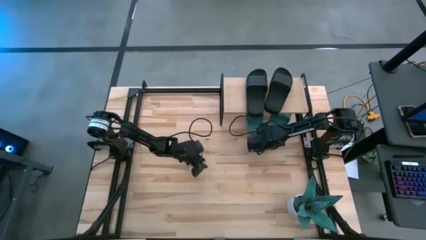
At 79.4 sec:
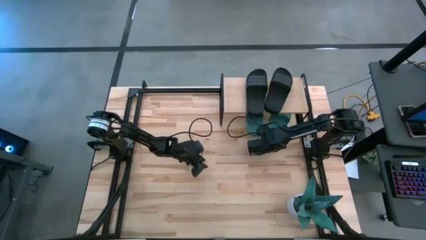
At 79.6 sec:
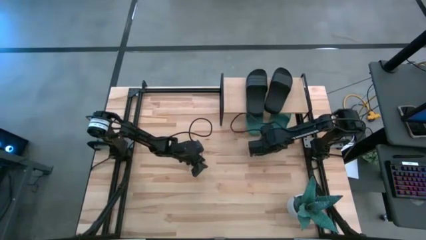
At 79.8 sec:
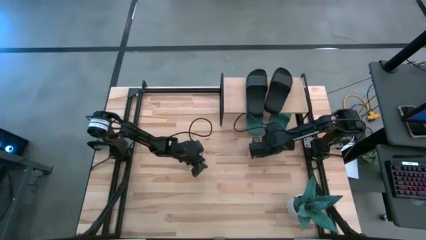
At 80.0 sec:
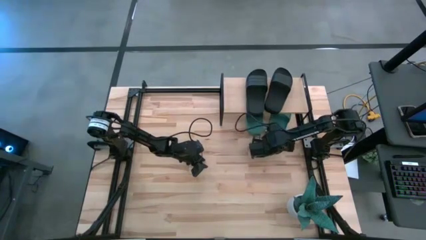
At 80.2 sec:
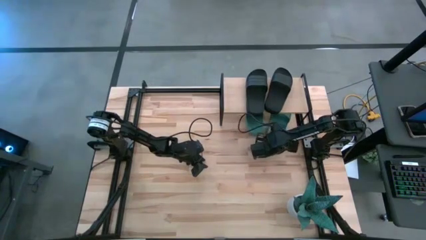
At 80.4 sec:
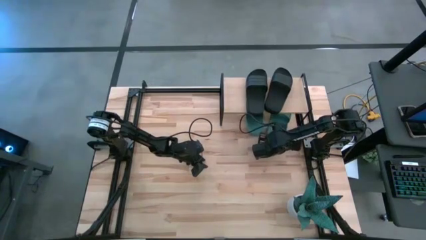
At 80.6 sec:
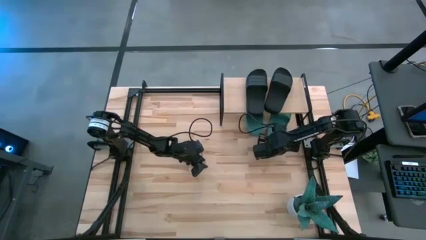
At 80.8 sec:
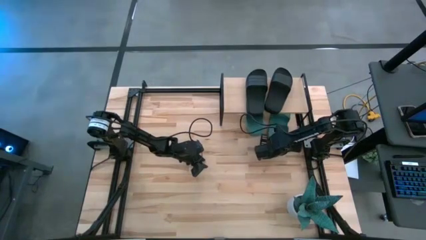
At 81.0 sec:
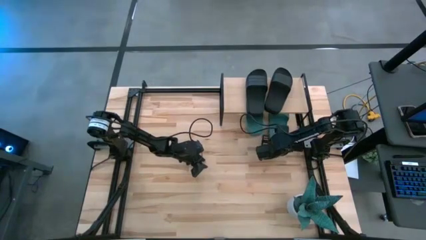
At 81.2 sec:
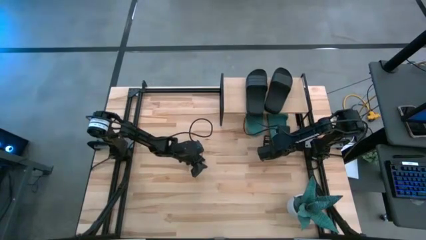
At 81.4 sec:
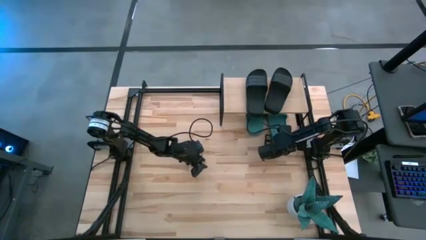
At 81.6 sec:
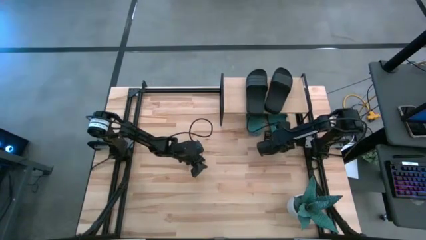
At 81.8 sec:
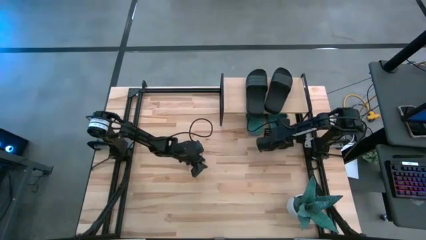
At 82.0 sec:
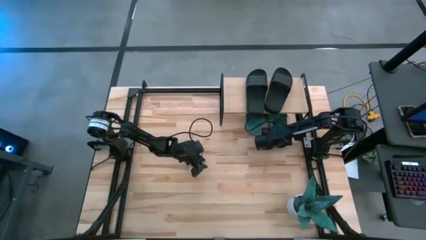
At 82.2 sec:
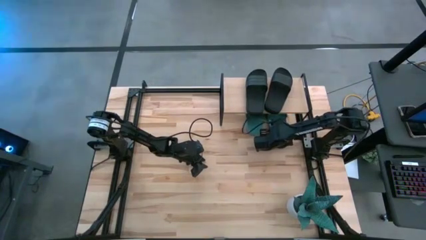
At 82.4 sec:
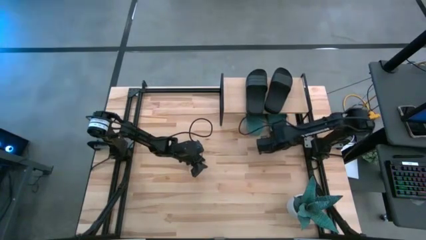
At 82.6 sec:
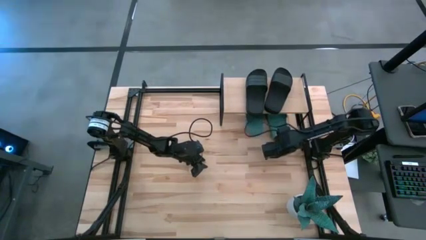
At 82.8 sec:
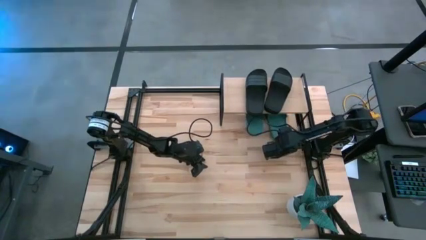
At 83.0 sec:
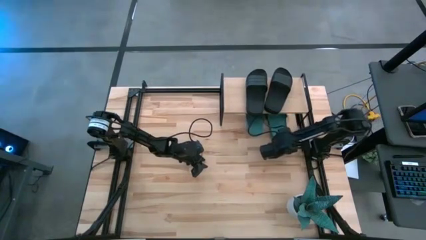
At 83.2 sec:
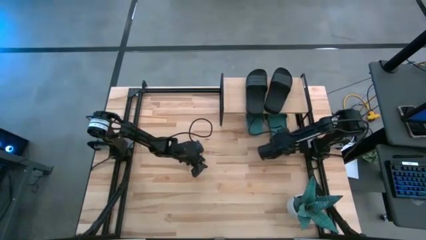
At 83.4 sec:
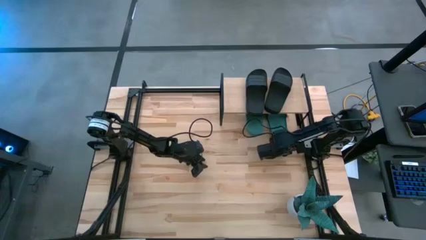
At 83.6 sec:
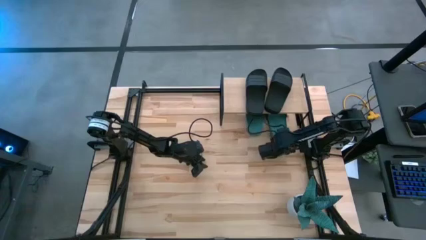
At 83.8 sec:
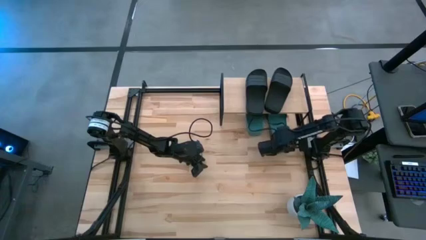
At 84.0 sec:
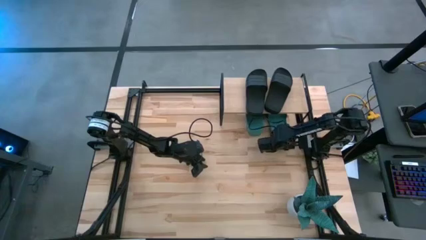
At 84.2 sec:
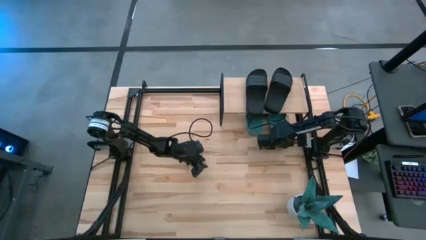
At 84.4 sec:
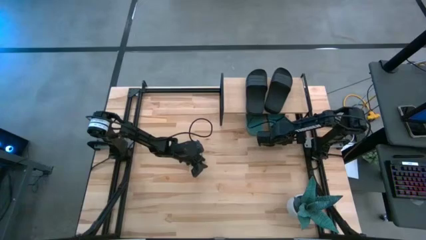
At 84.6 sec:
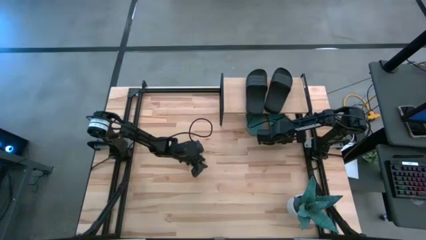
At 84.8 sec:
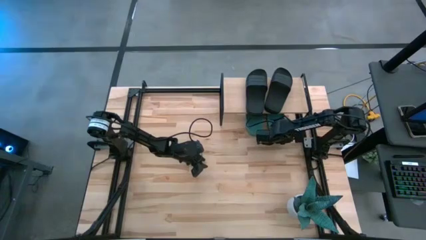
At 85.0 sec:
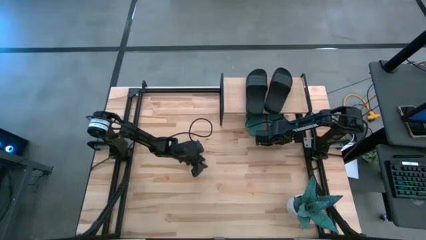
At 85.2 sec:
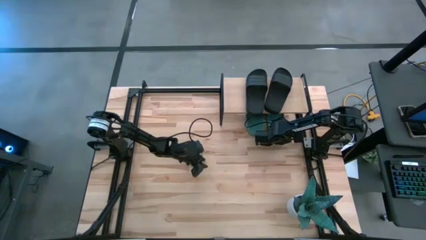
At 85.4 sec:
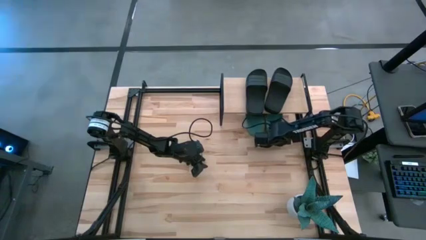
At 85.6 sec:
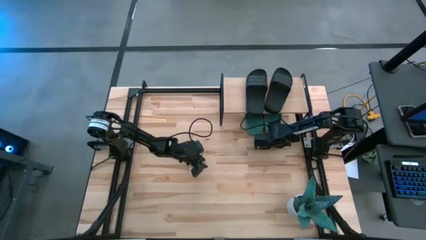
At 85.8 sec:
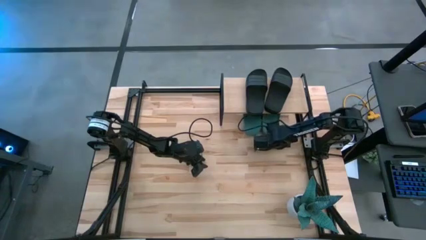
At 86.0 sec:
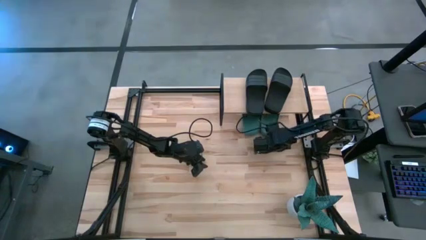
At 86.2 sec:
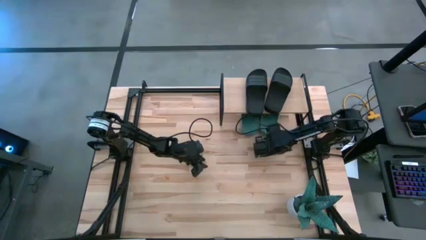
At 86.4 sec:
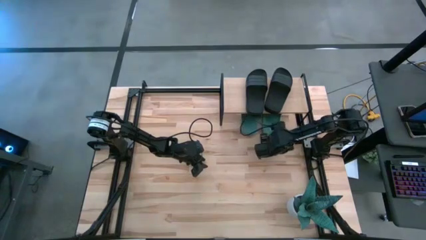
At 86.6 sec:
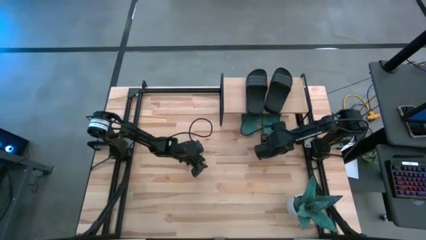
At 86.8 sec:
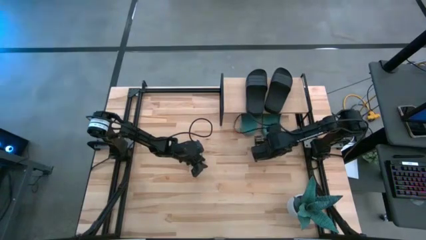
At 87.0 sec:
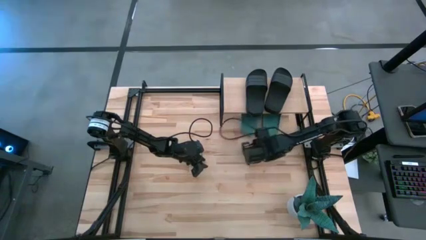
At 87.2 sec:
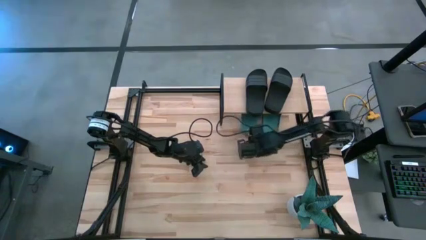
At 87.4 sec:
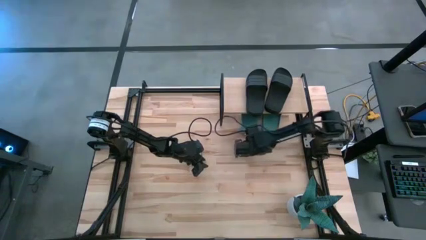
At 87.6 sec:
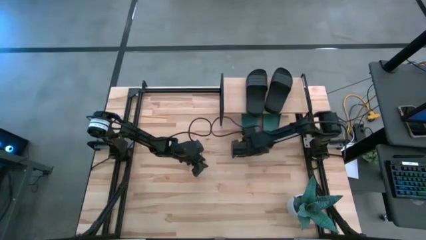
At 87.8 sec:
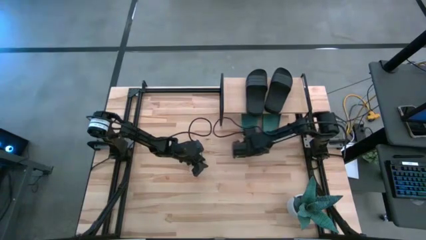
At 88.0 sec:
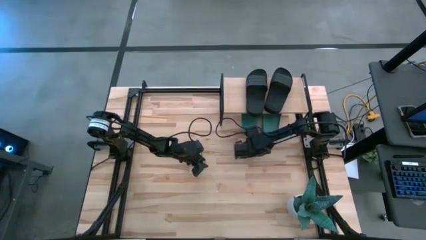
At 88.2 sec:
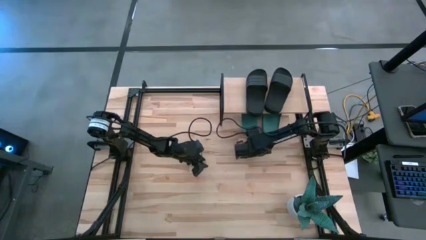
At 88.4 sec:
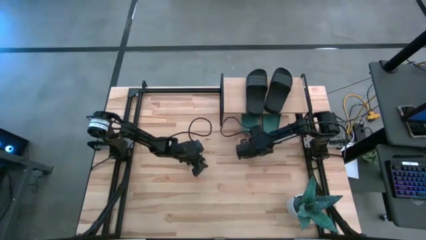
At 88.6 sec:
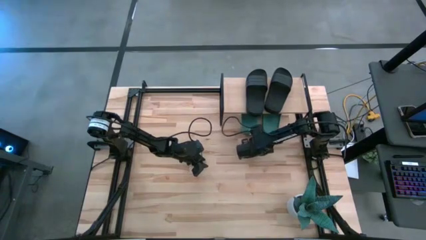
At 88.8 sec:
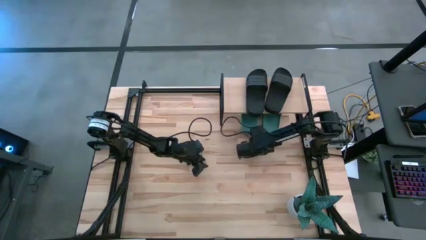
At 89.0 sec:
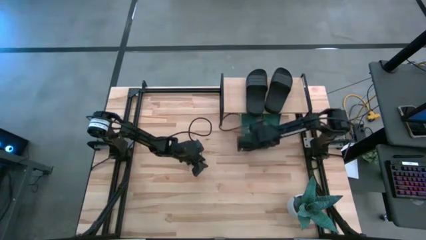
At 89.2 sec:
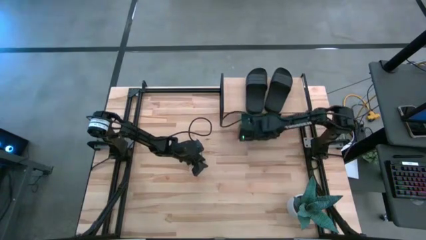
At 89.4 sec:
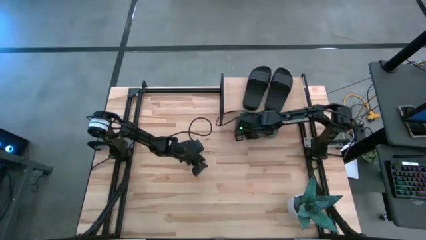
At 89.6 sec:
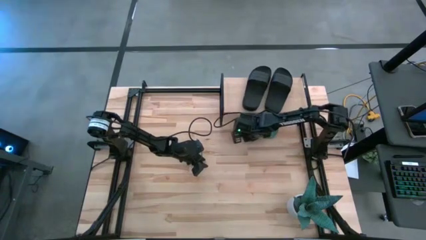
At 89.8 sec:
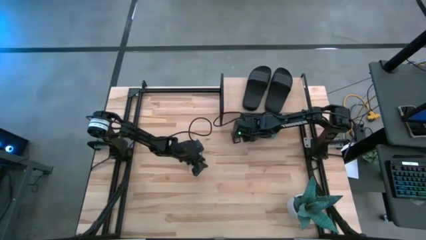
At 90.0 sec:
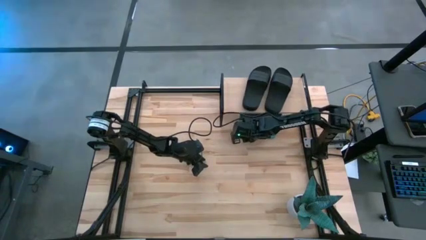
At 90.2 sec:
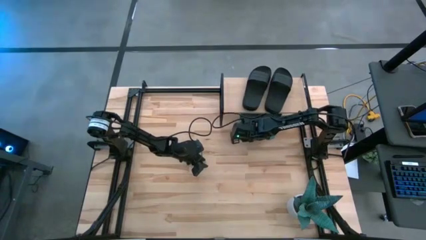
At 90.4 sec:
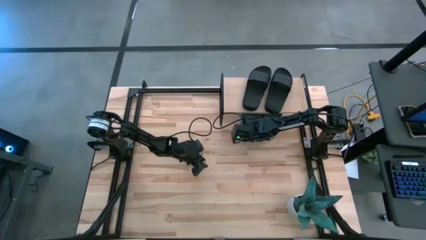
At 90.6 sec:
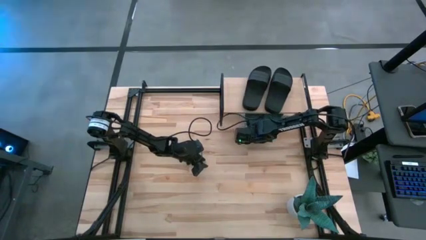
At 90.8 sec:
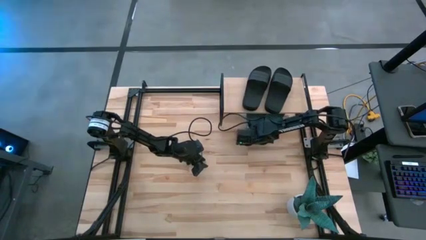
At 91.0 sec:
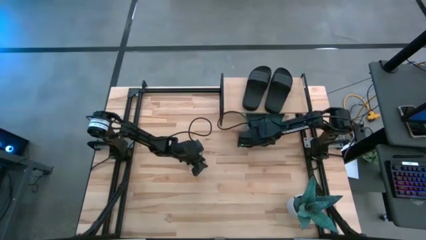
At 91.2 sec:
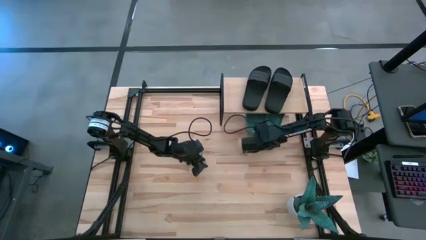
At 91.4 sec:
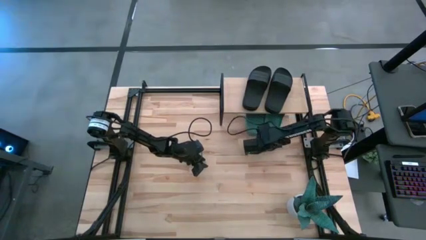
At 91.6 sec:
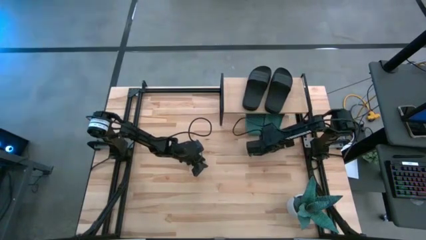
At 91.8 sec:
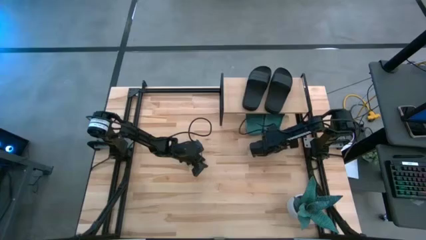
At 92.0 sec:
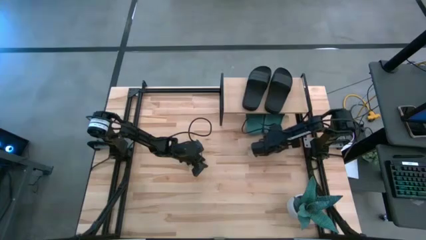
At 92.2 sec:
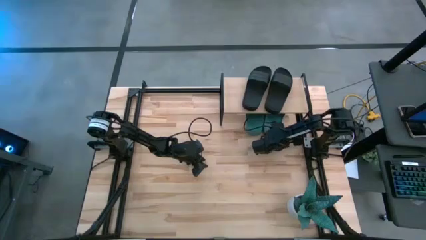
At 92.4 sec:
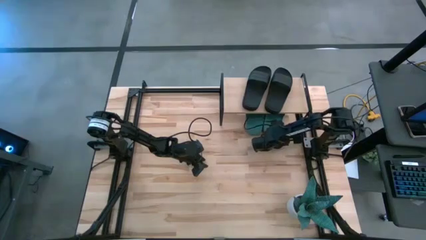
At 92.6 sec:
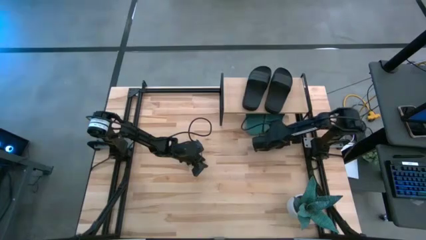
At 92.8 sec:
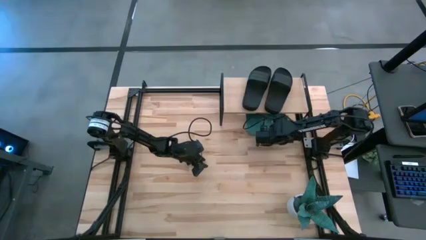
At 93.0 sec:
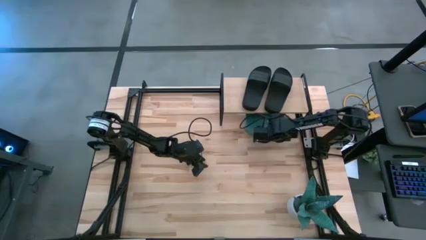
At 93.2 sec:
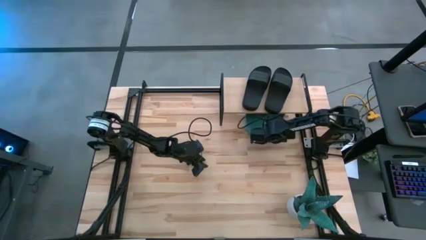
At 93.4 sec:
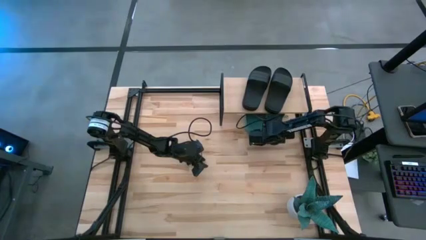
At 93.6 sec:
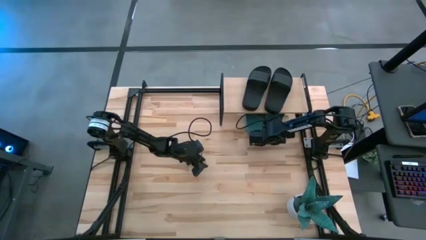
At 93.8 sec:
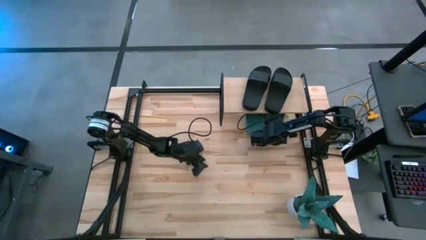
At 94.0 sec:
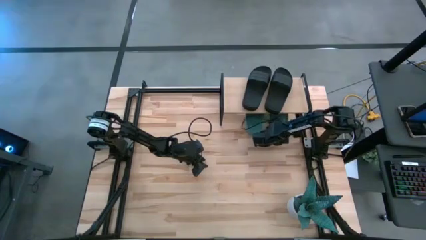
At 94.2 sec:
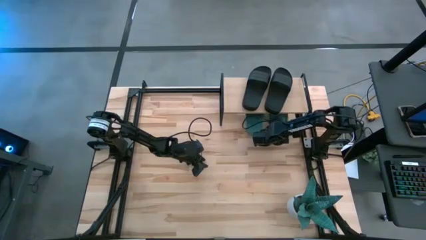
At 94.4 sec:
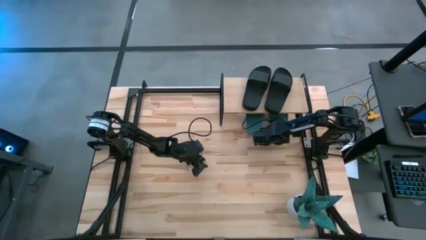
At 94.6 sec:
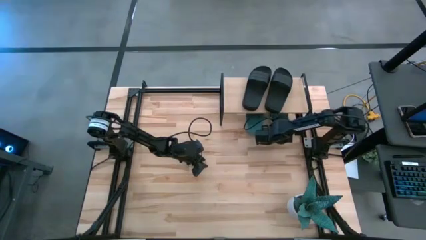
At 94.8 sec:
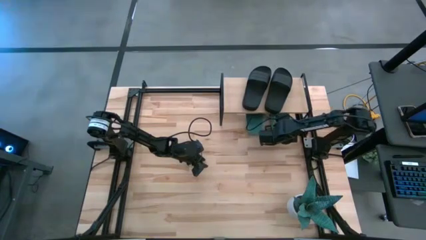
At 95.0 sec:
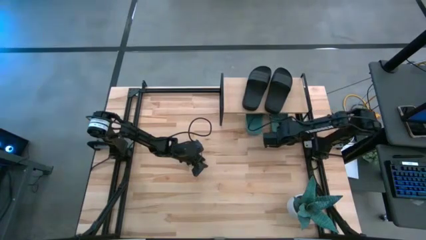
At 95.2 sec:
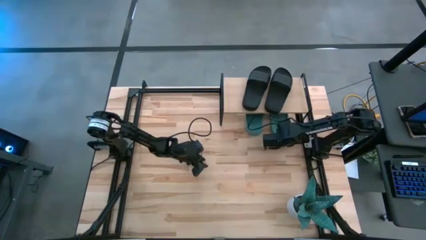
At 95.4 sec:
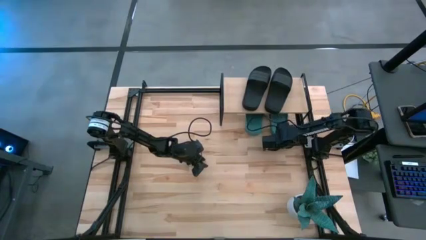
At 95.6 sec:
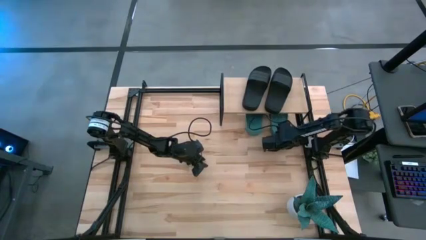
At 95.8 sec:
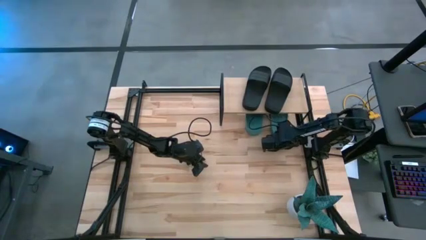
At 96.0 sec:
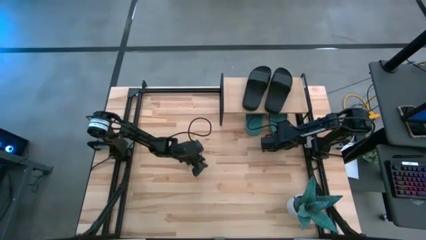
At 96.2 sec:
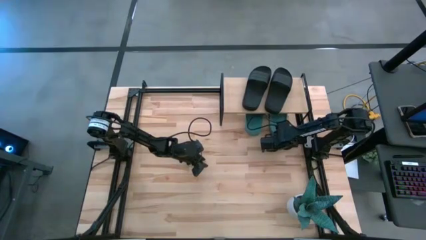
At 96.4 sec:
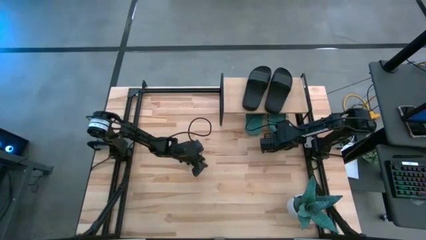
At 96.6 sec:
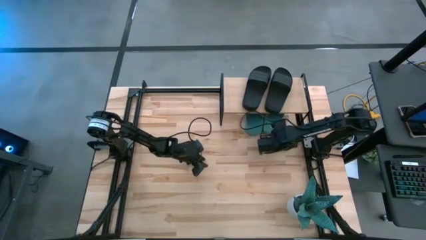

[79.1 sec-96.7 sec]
Task: Pick and place slides into the shelf
Adjust the green slippers under the shelf
